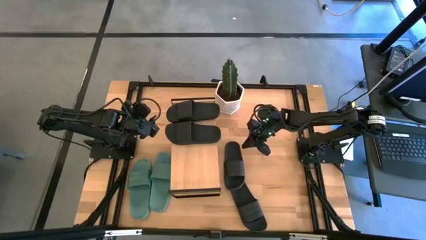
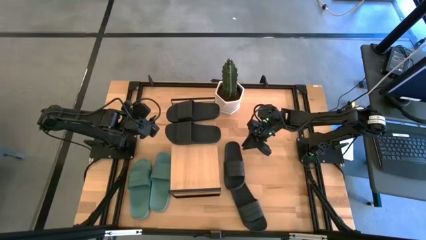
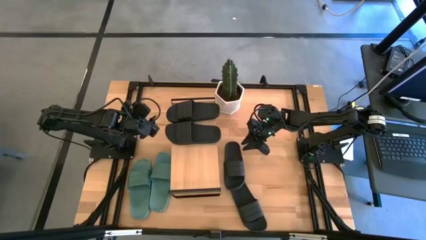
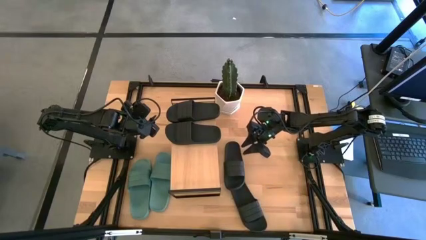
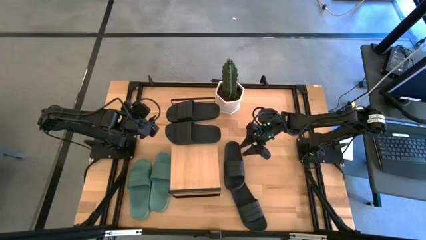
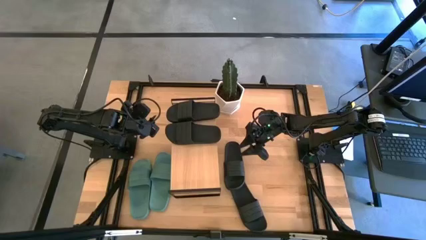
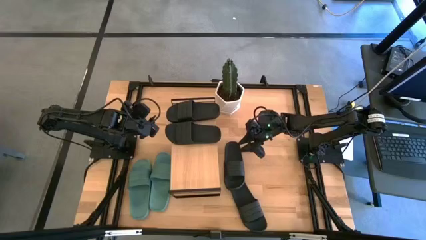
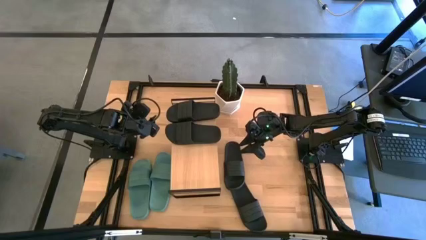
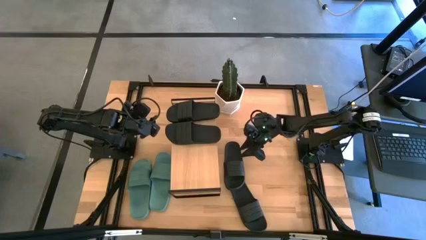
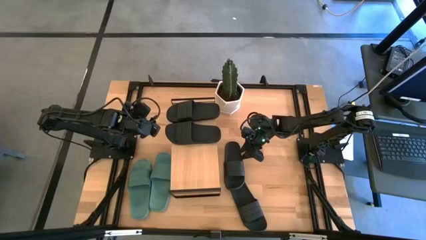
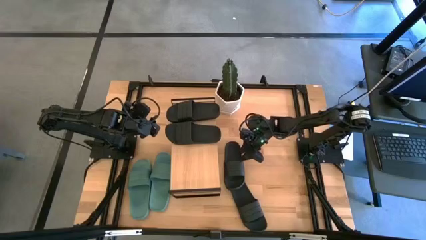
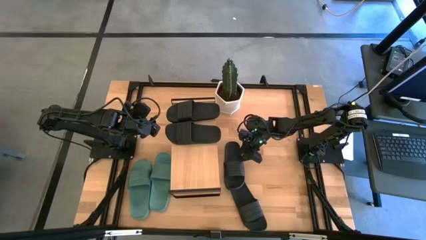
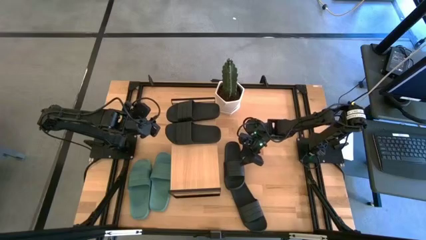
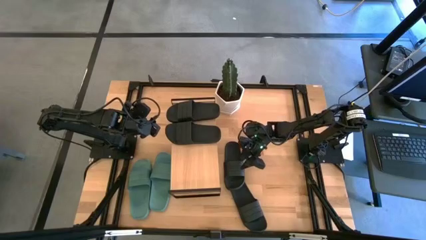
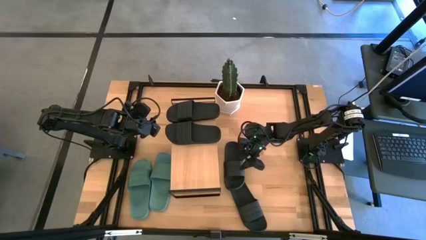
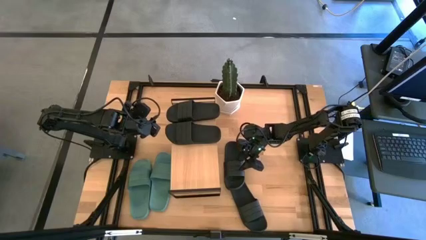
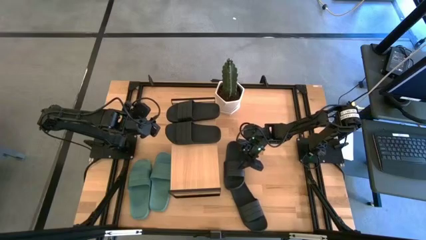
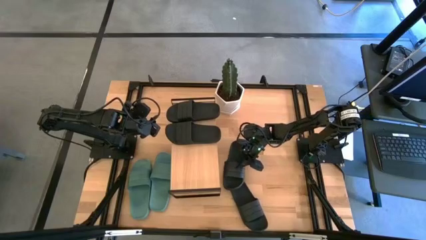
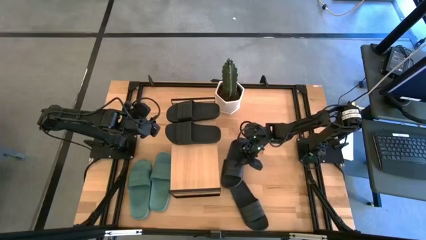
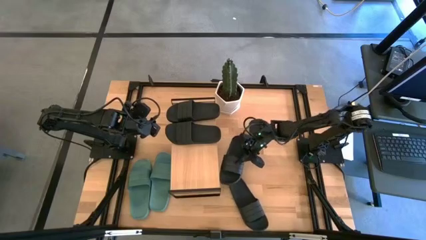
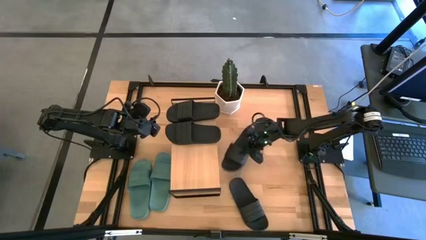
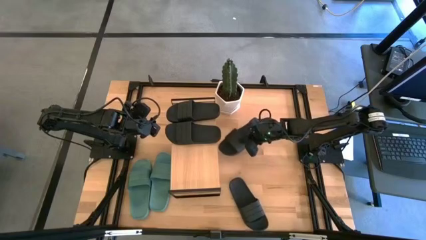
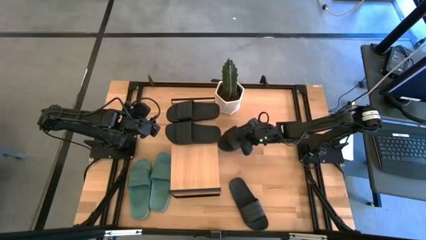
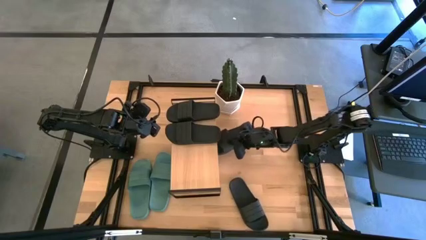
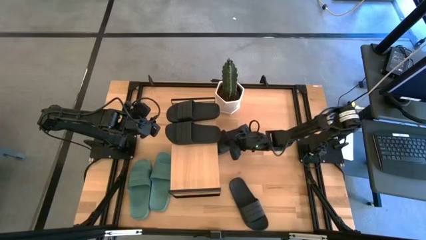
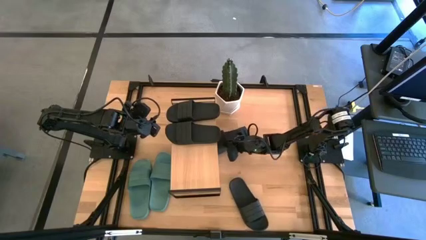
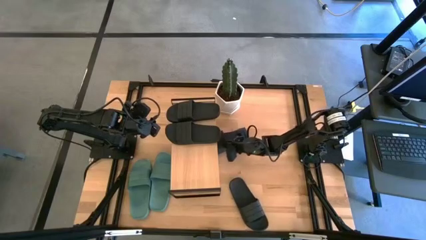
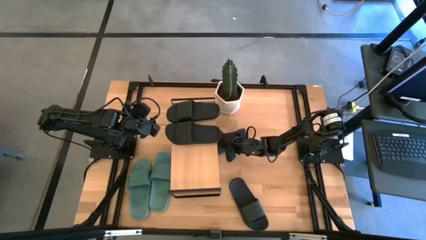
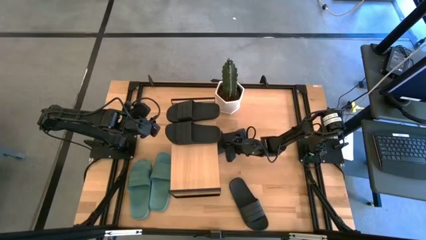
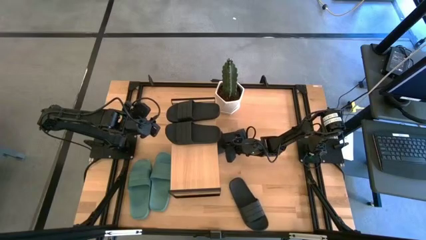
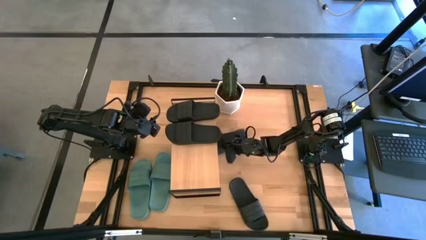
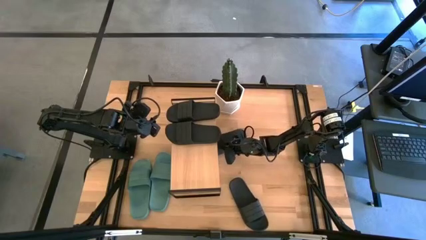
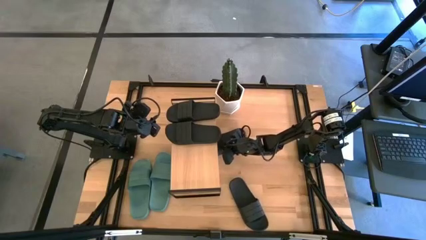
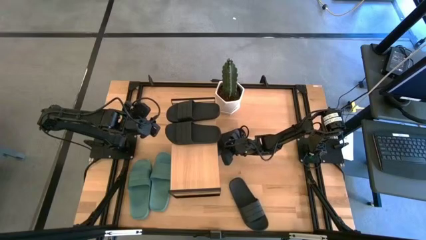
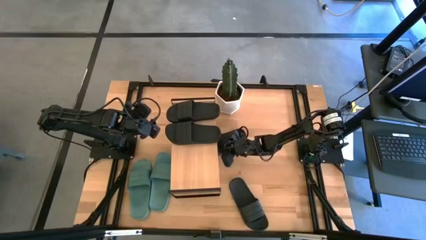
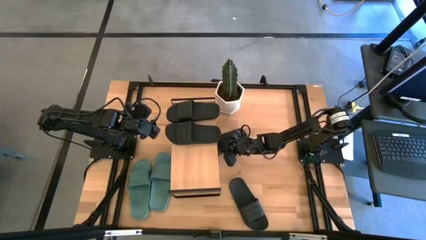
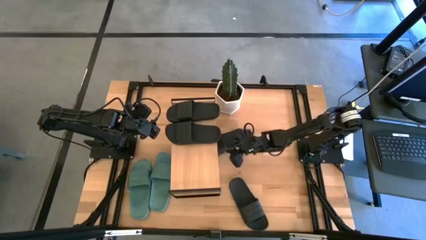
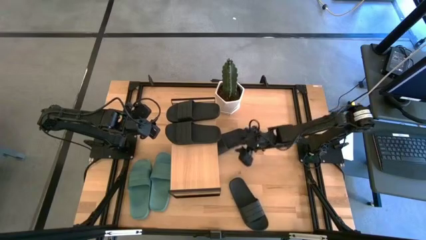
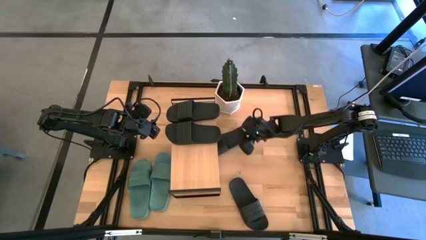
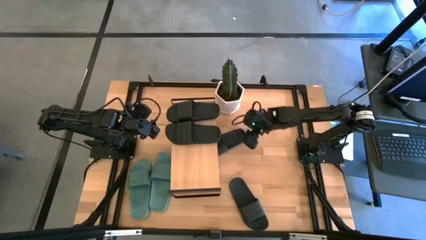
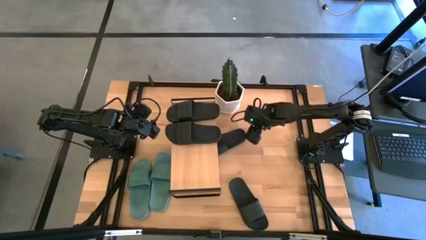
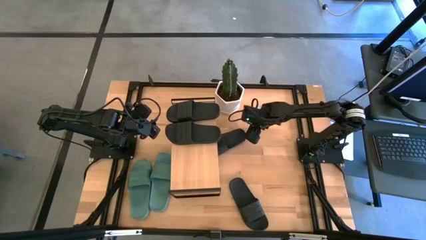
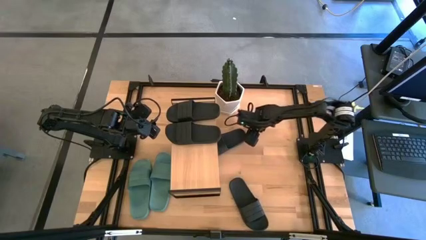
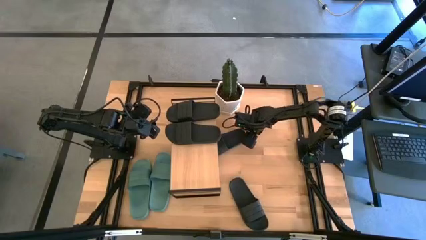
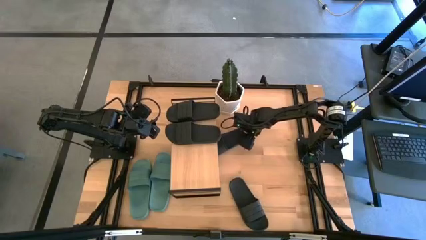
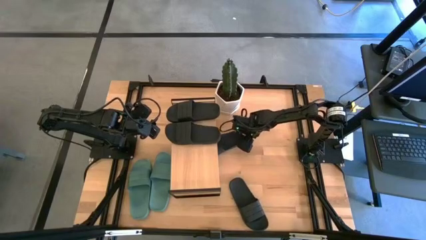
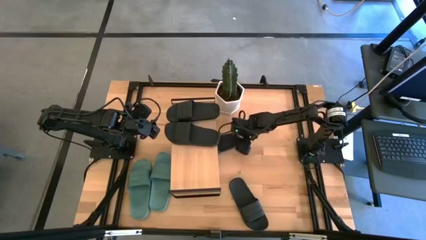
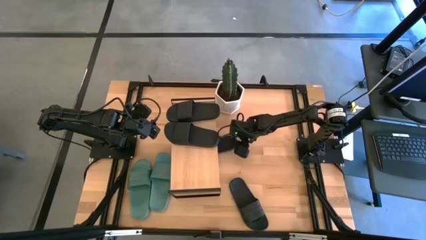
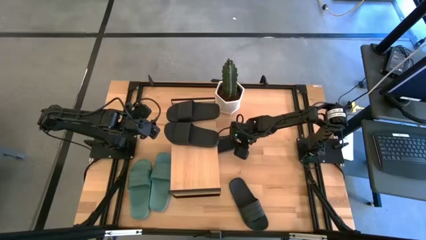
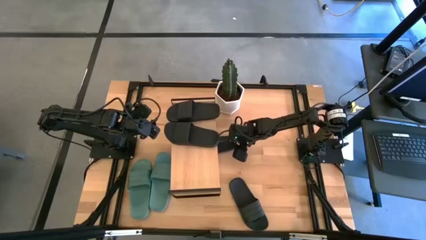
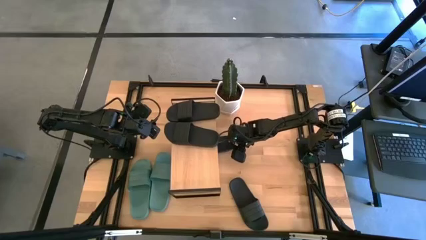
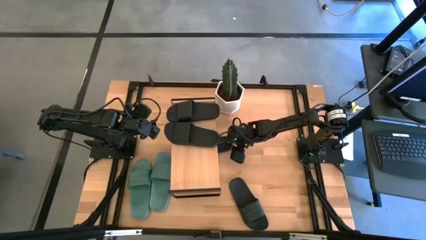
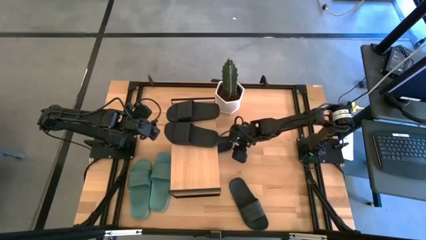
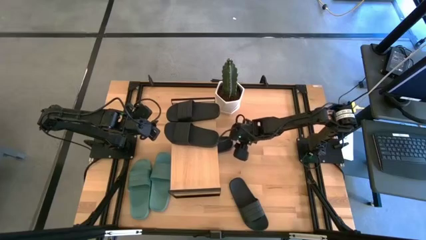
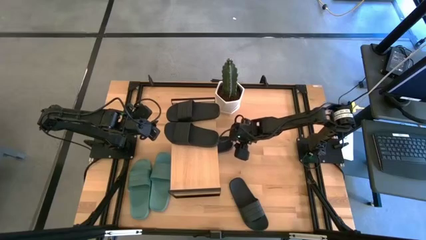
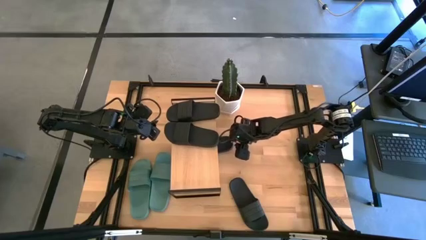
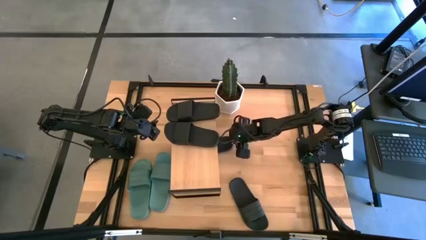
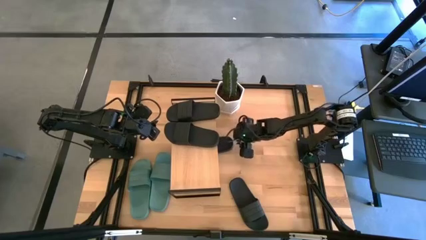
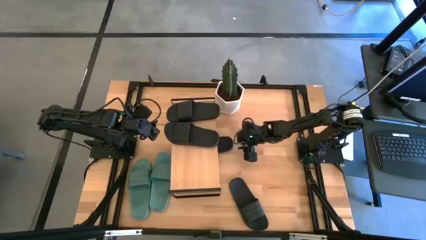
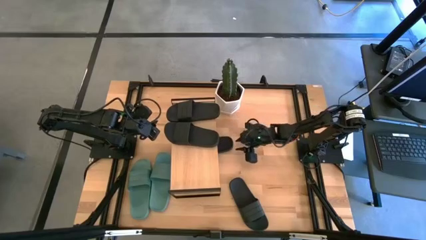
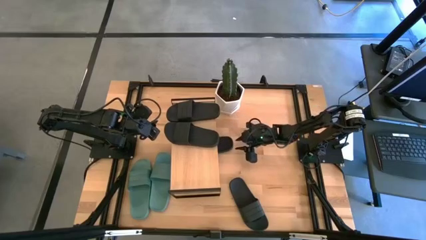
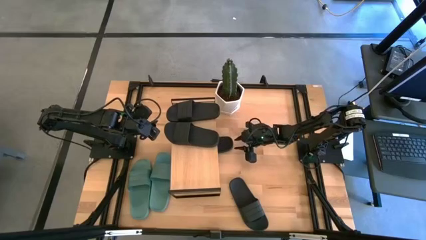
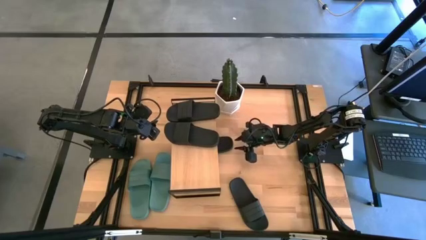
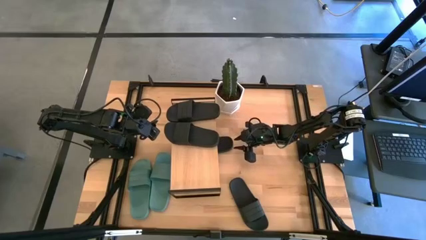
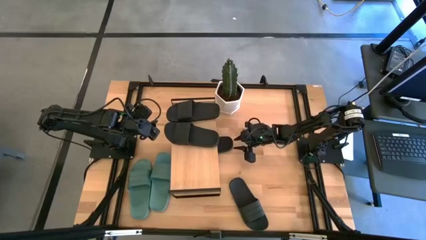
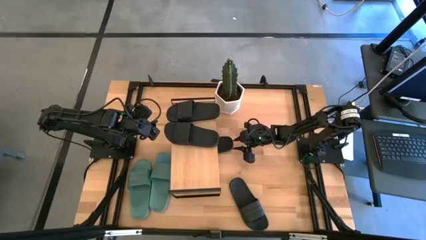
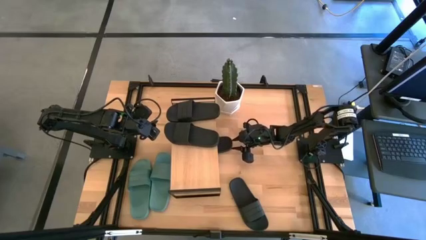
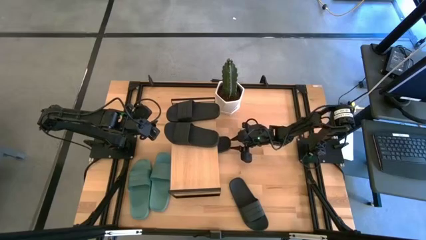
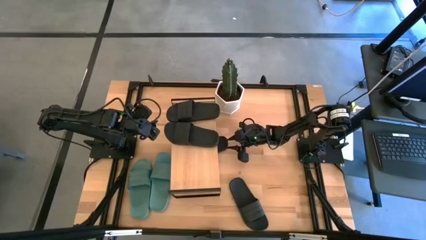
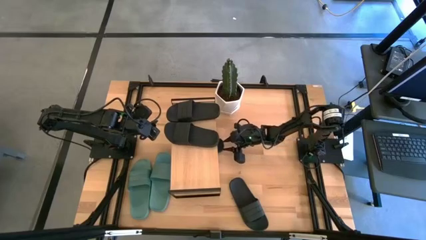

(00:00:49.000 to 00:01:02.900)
Task: Pick and place slides into the shelf
Put the black slides under the shelf
